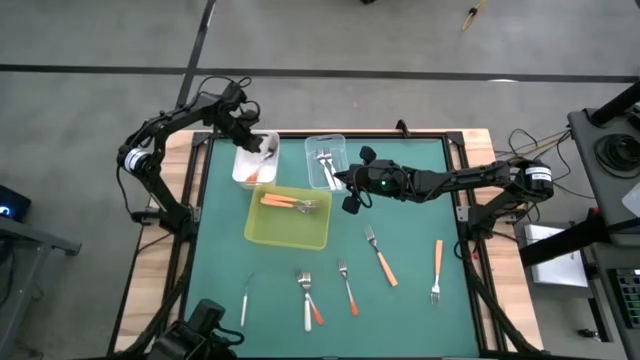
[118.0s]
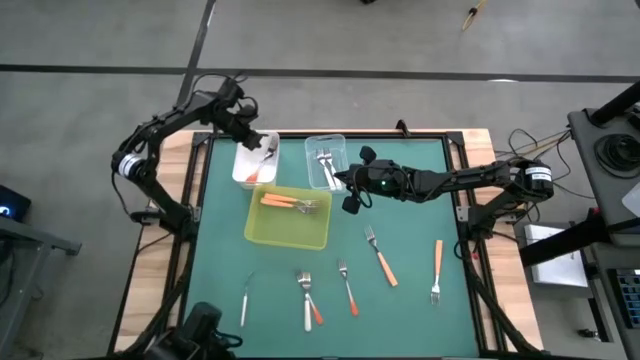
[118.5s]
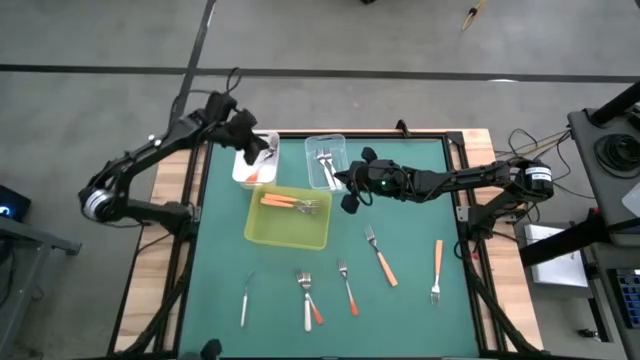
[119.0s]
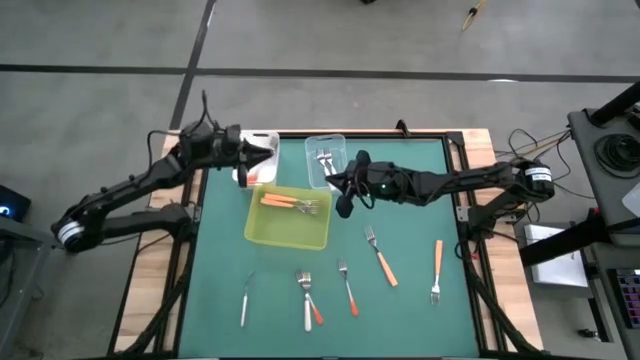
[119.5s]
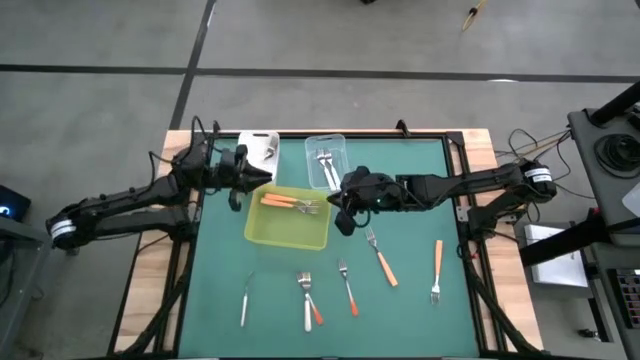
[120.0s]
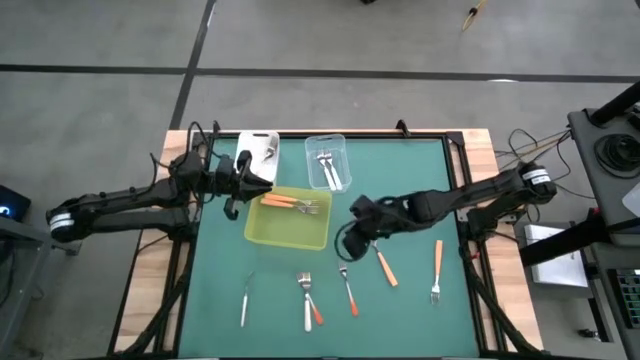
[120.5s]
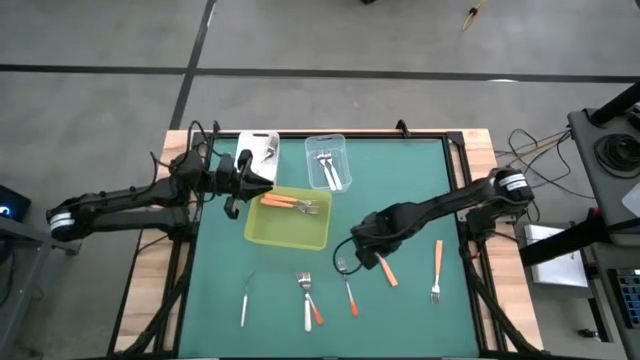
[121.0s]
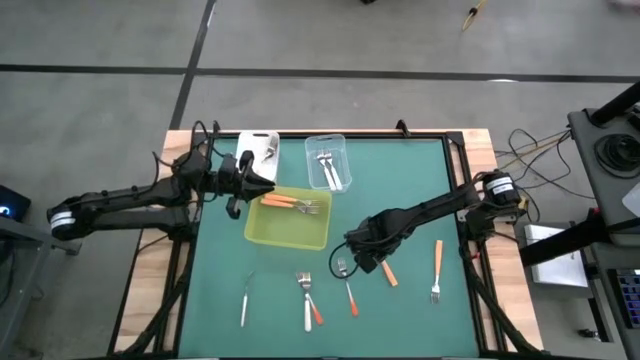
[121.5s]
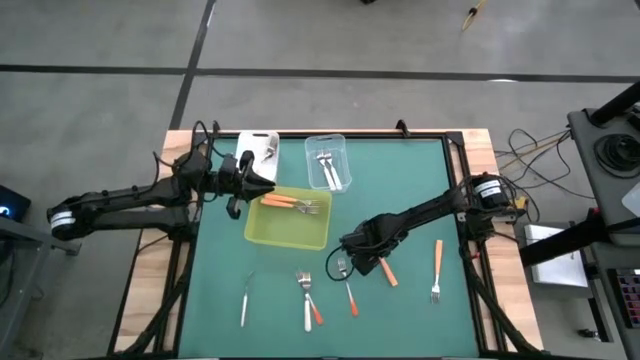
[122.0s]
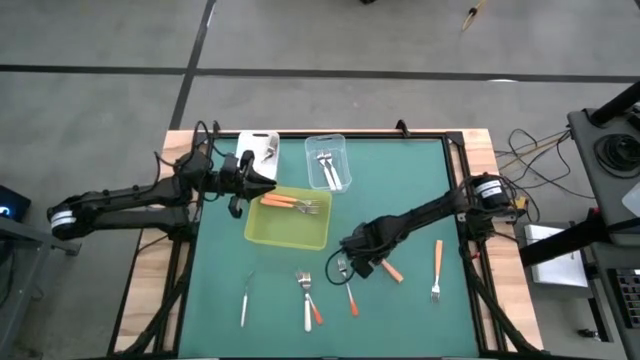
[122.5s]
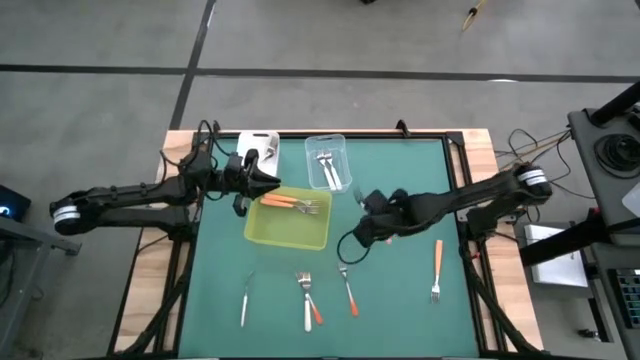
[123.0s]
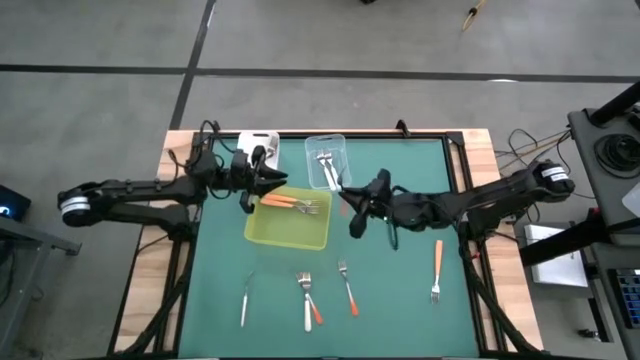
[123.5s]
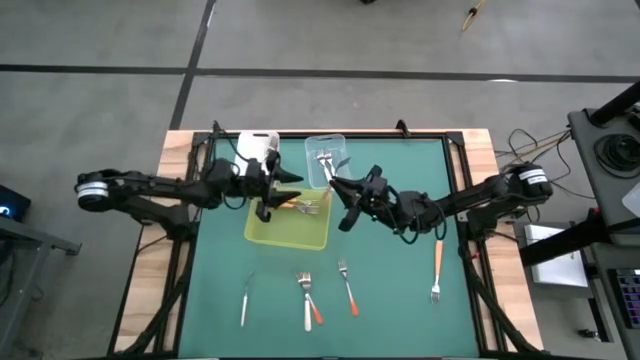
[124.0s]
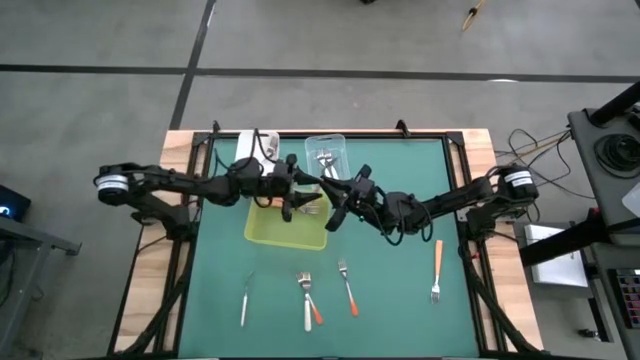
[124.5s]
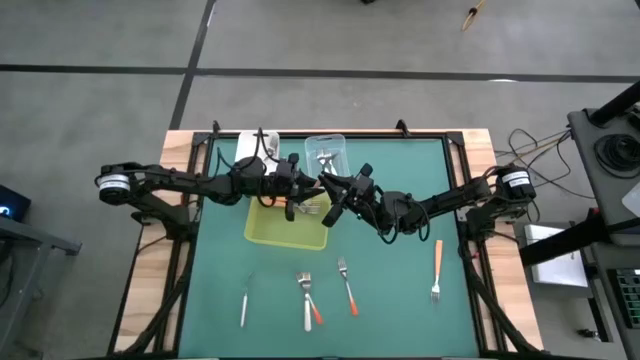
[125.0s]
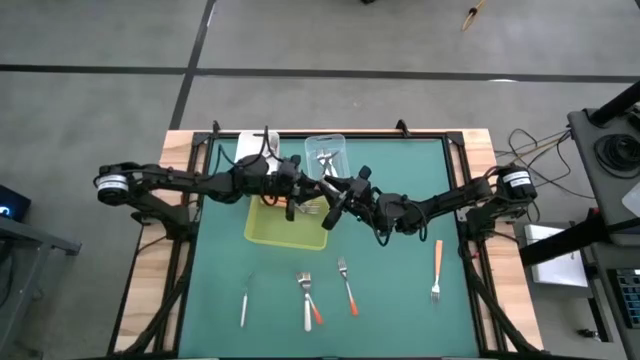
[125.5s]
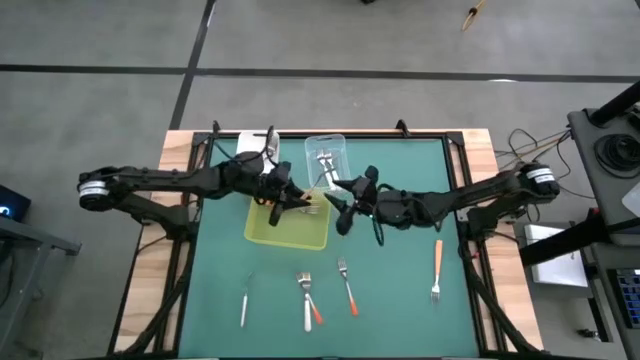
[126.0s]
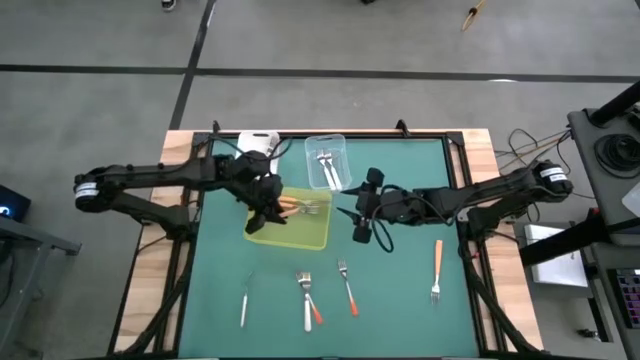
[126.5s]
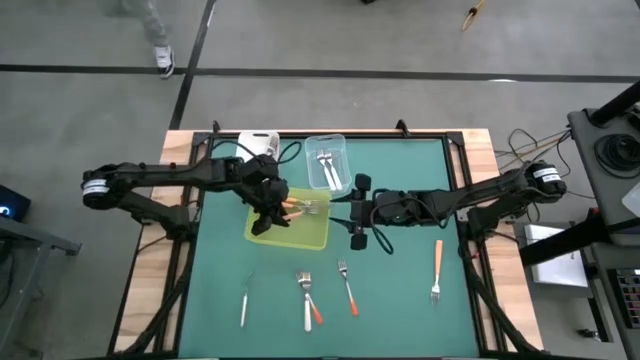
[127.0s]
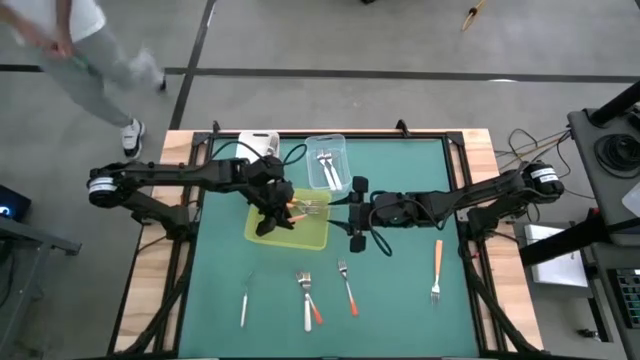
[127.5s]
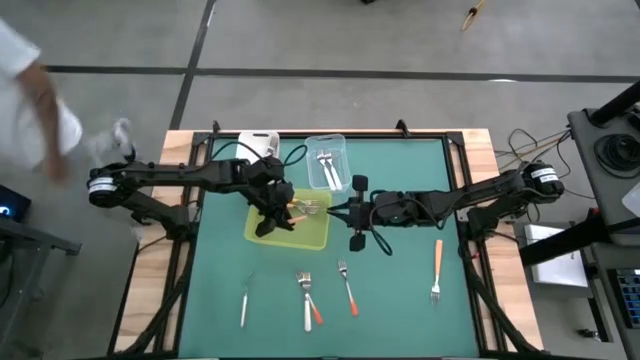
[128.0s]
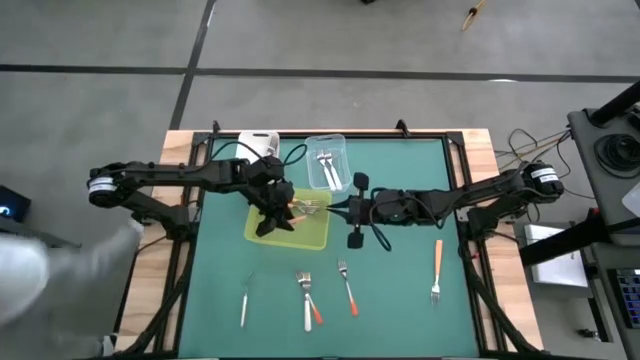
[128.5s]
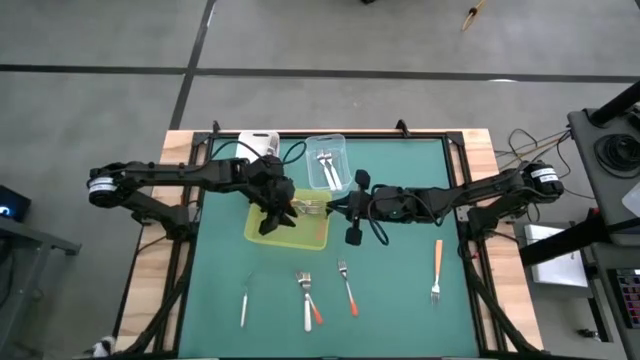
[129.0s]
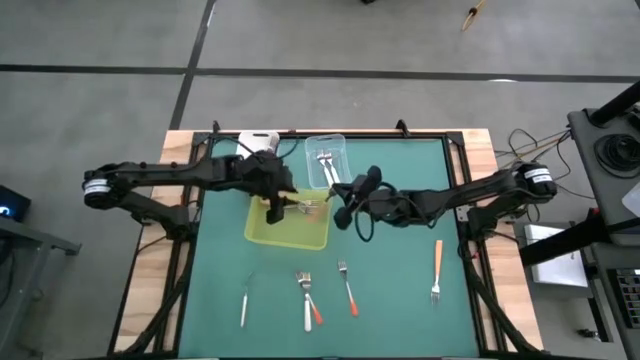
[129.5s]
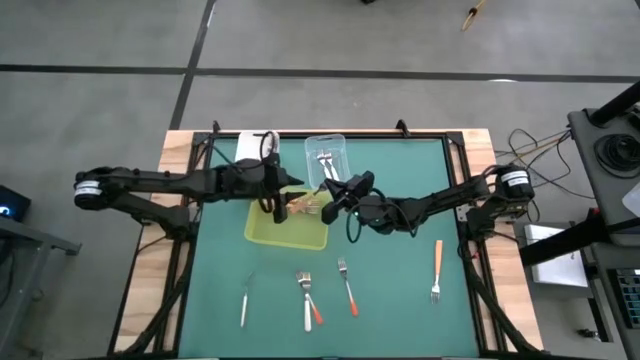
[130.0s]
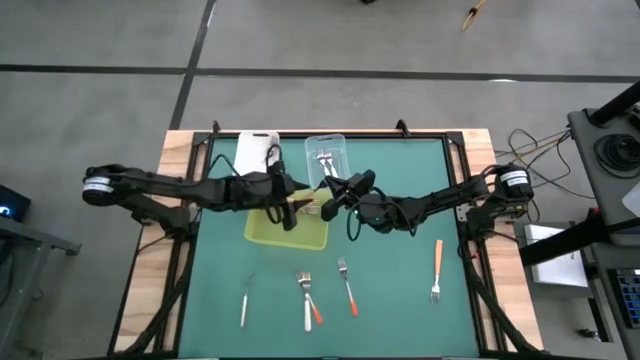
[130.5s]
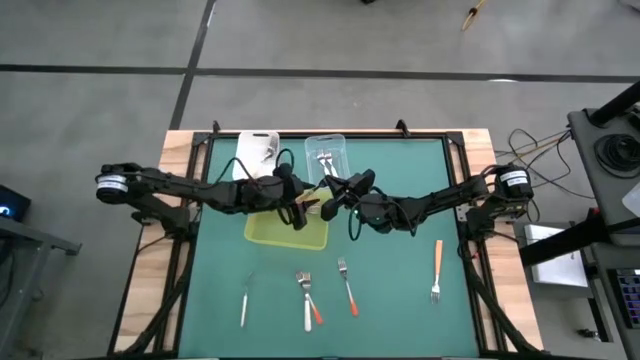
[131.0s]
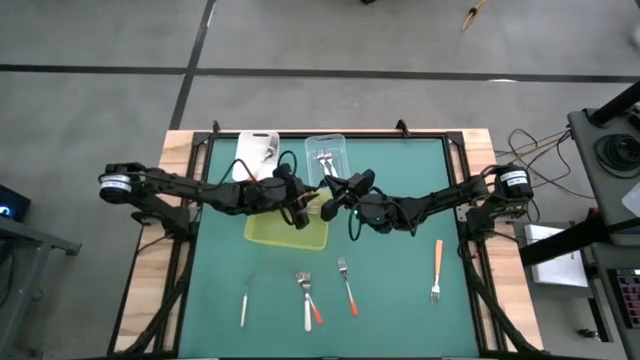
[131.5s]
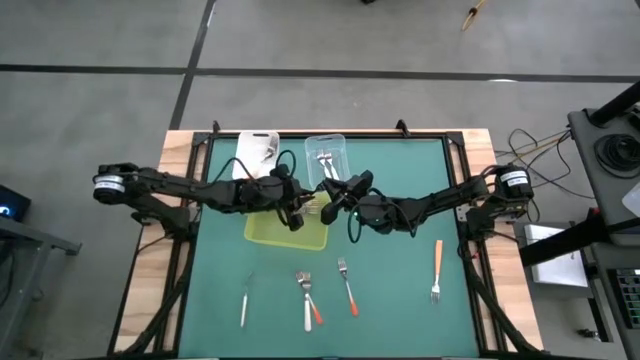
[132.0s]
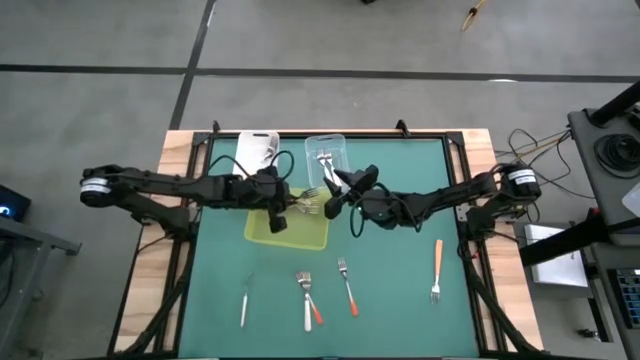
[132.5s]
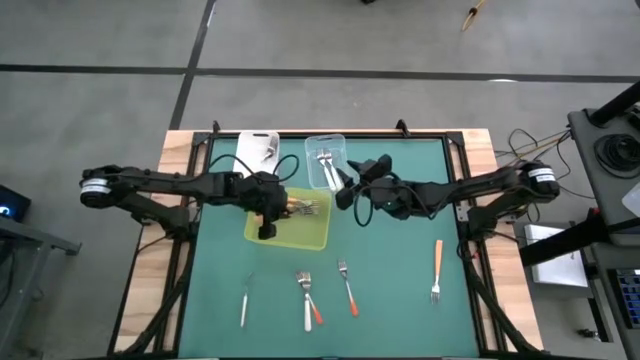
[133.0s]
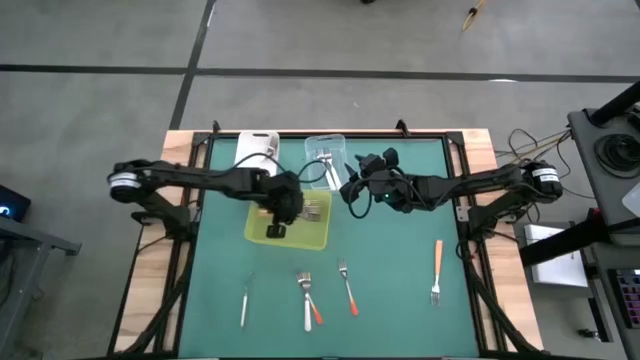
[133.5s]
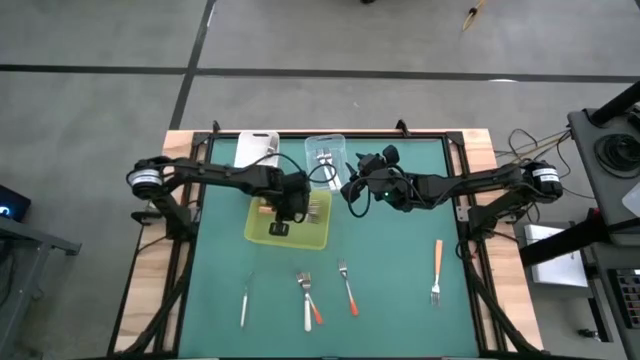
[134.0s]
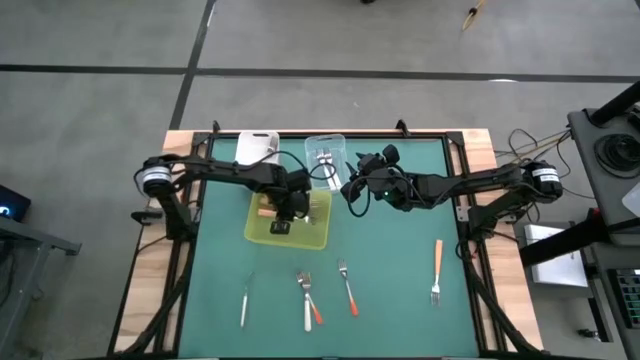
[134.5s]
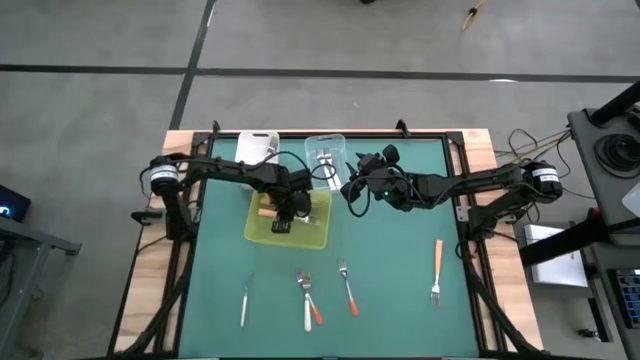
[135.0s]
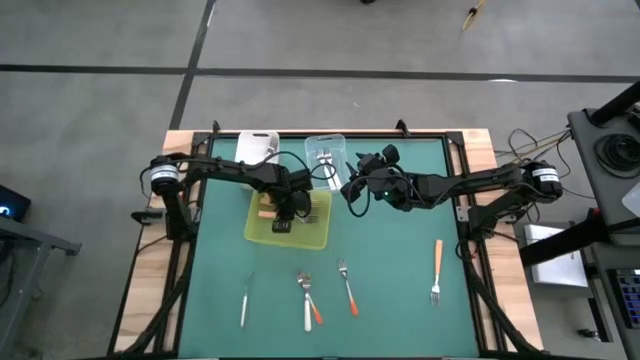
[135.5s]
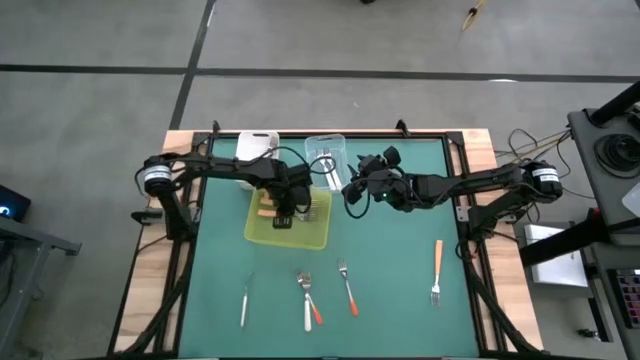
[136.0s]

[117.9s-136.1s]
Task: Sort silverware by color (type)
Put the yellow fork into the yellow bin

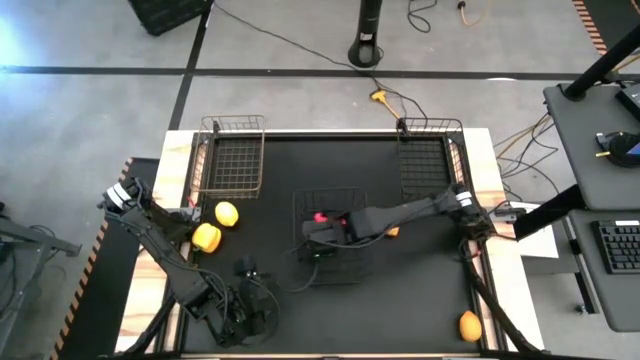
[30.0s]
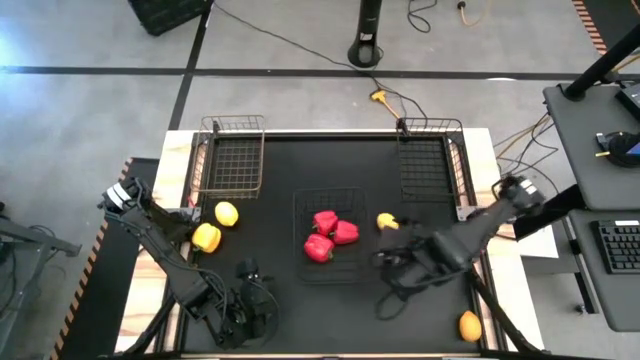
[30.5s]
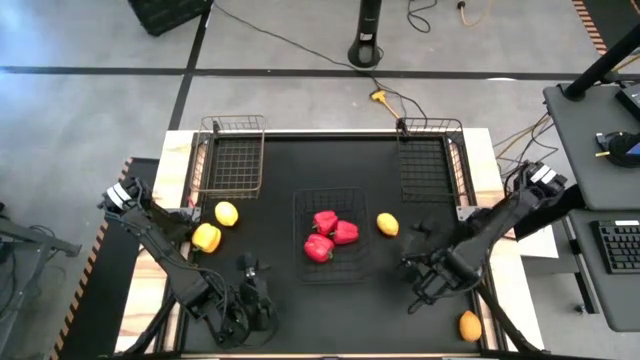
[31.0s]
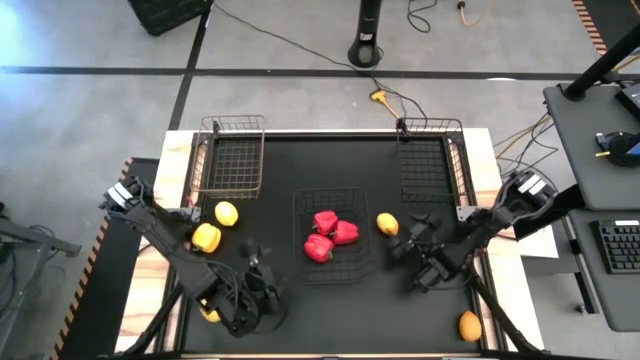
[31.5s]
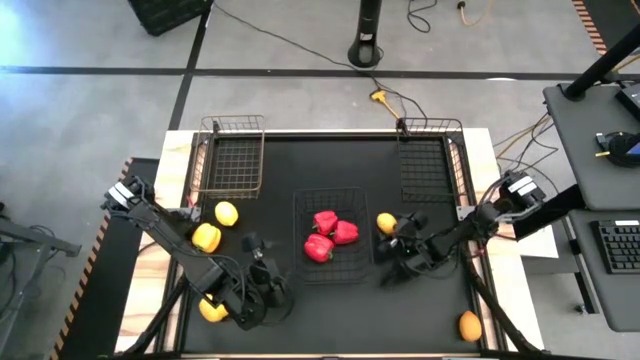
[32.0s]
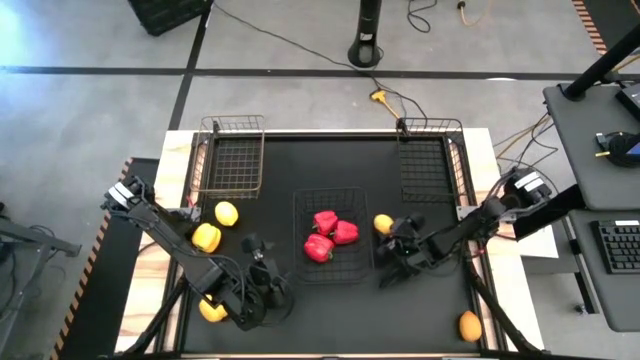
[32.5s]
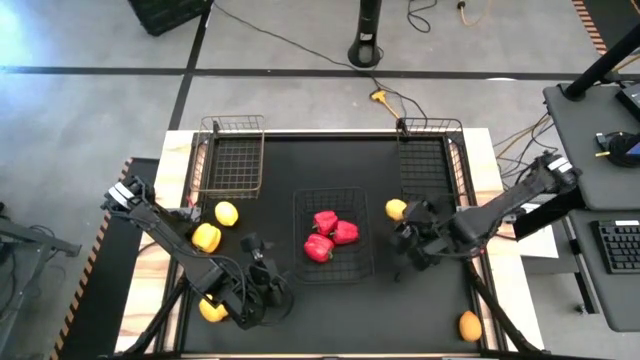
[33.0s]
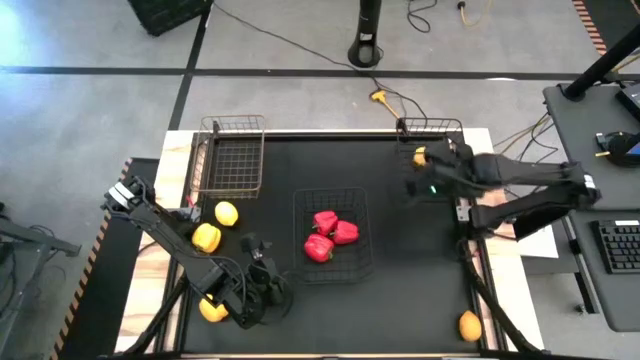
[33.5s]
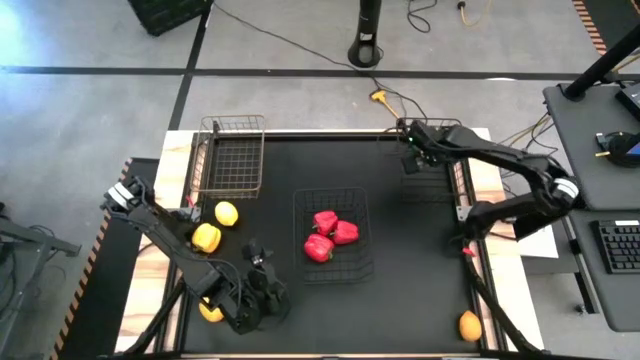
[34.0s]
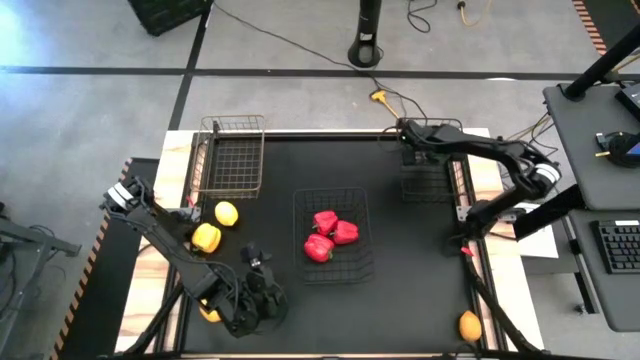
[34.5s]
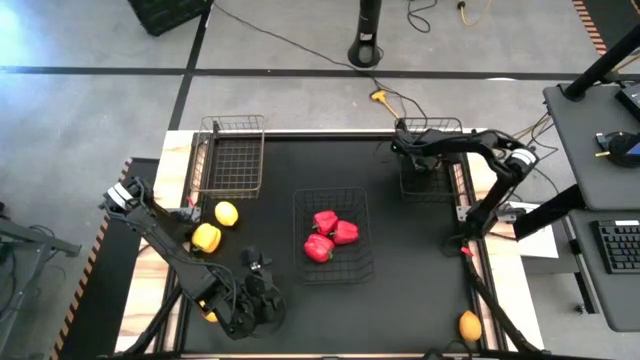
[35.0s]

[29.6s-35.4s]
Task: Sort produce into baskets
Put the top right lemon into the right wire basket
